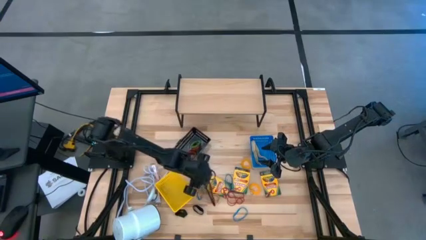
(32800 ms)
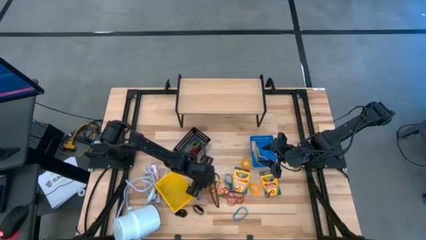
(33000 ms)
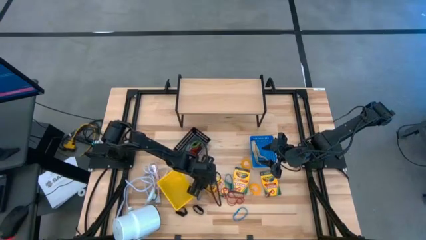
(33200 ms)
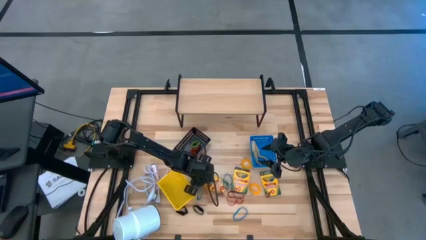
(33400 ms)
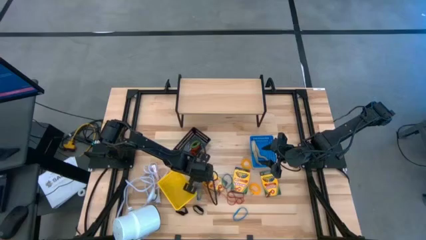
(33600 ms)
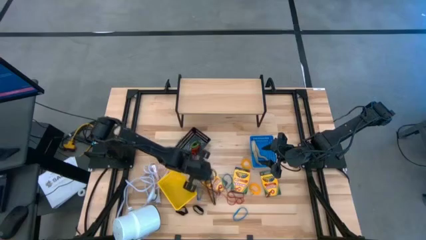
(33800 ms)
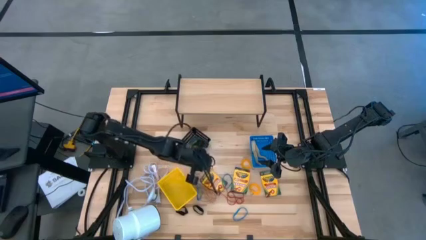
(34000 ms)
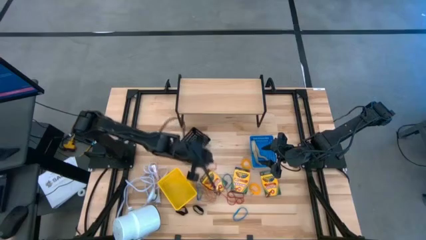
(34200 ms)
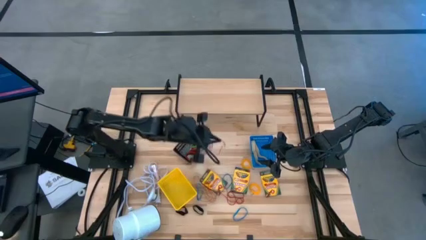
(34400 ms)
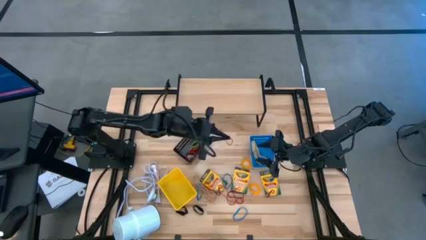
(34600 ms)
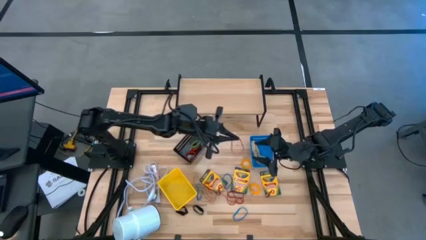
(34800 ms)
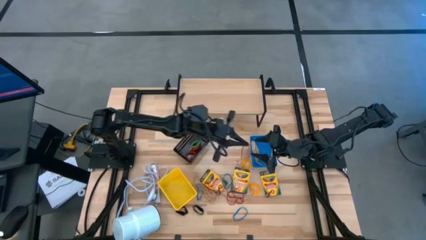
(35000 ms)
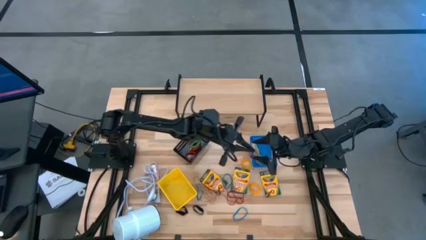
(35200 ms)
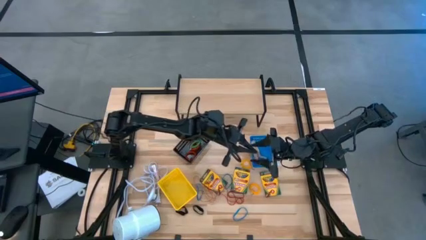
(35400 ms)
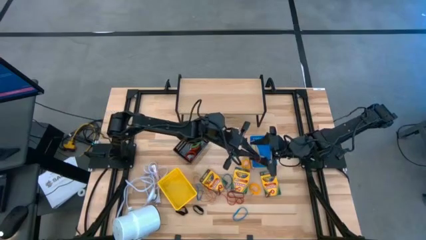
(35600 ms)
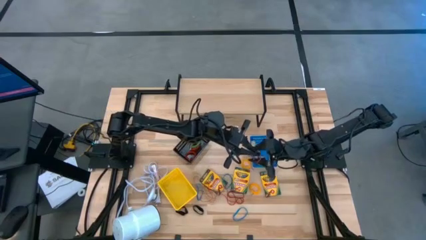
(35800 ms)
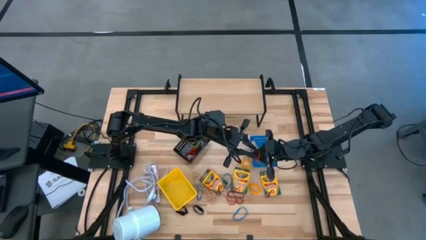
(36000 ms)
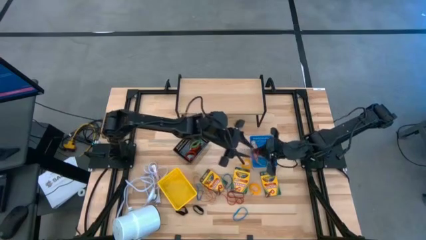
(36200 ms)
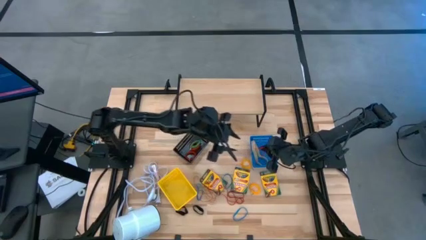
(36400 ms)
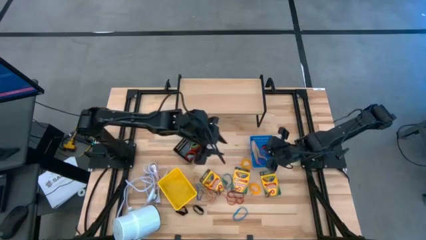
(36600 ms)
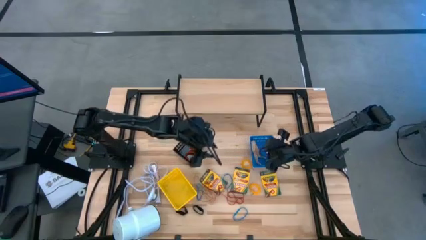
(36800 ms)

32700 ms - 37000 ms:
Task: Pick & Place Office Desk Supplies
Put the red rubber band into the blue bin

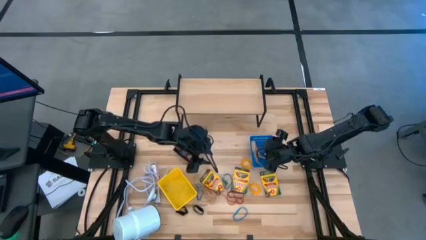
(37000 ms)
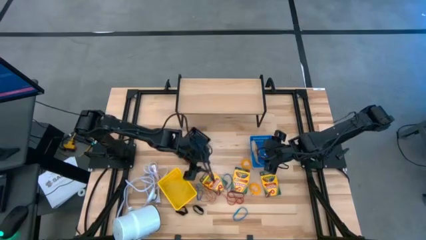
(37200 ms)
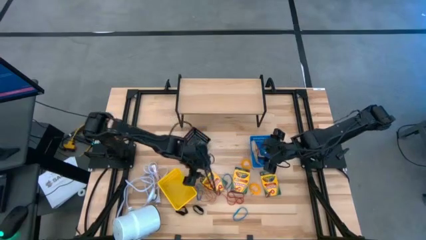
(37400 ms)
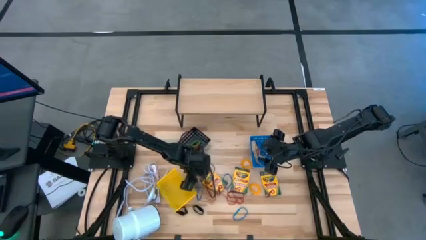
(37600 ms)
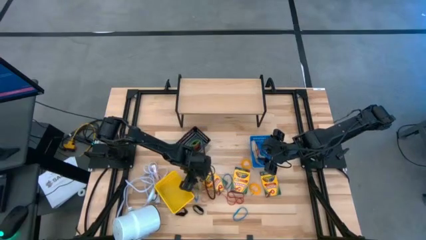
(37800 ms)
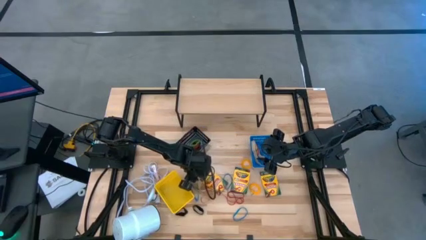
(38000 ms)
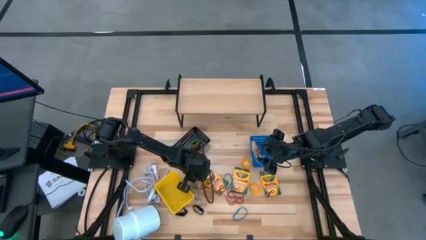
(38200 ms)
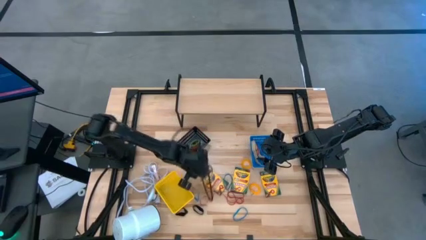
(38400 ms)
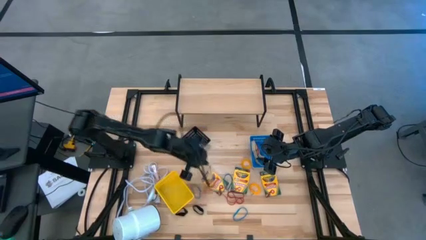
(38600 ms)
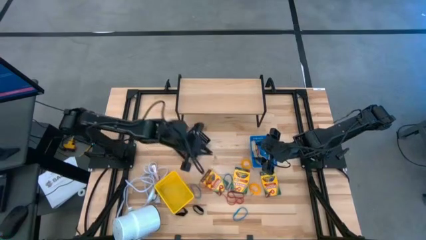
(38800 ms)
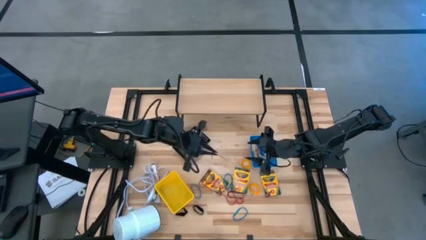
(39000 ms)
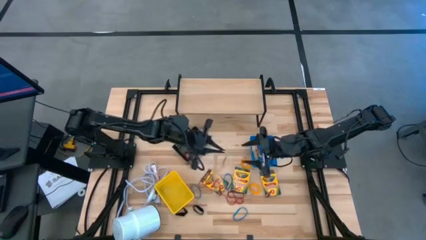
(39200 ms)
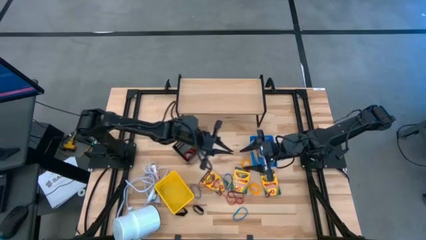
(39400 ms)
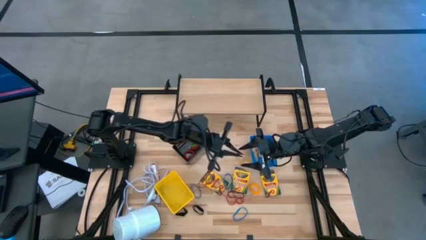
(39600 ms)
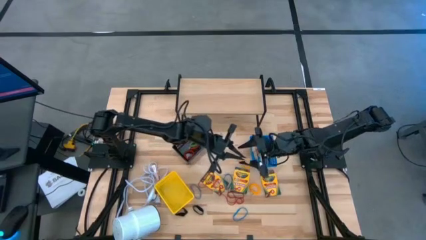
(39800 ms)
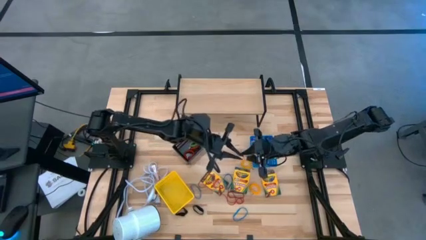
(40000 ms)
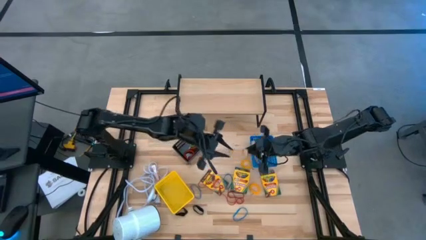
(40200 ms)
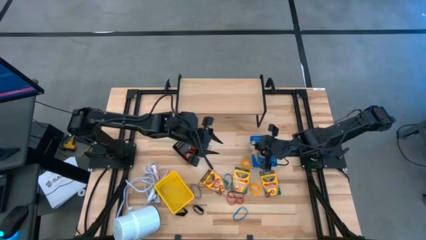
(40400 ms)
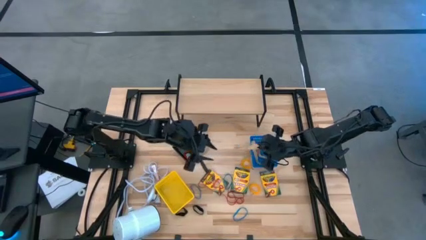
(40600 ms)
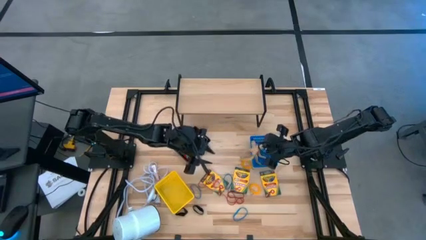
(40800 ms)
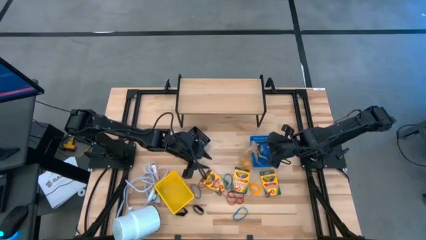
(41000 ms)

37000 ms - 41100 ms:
Put the white rubber band into the blue bin

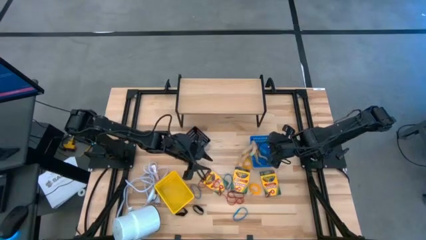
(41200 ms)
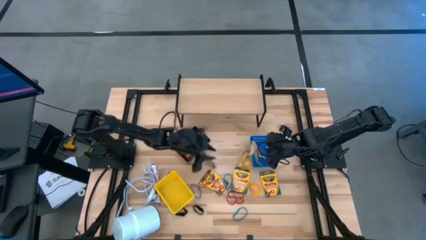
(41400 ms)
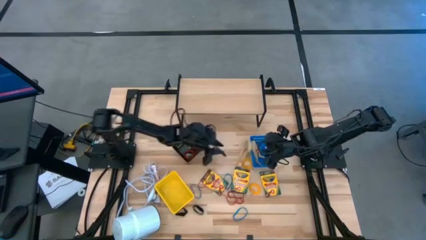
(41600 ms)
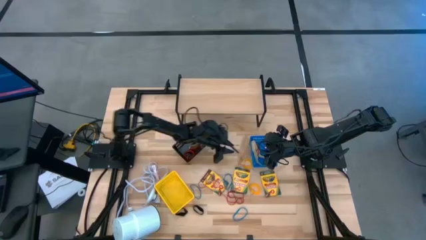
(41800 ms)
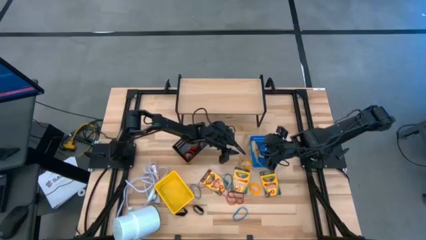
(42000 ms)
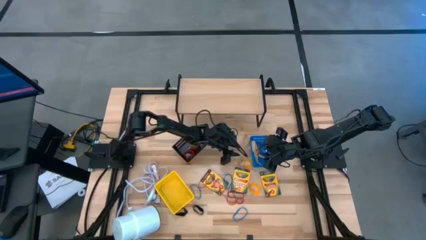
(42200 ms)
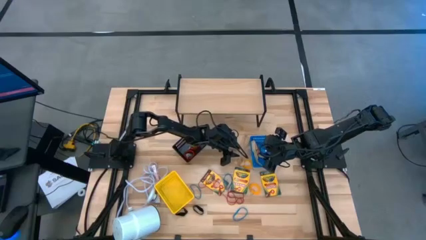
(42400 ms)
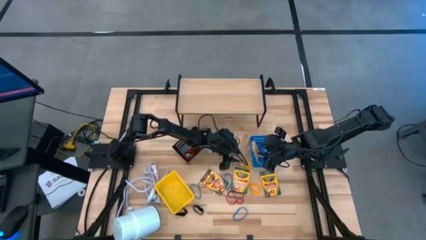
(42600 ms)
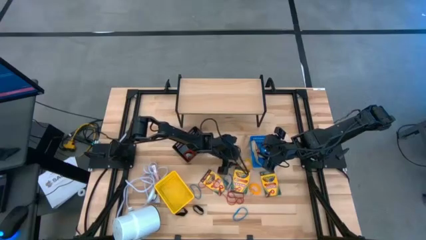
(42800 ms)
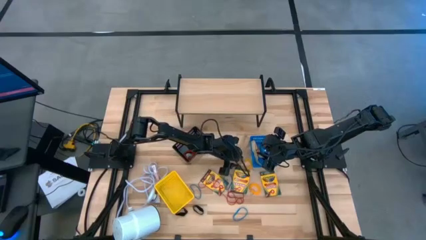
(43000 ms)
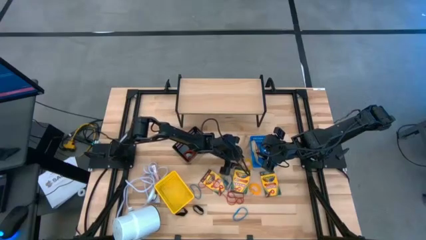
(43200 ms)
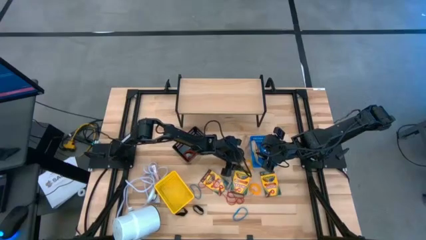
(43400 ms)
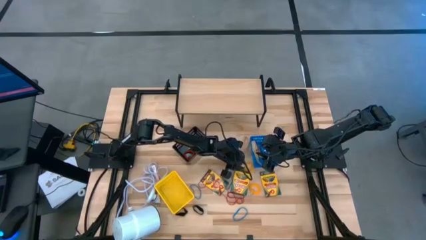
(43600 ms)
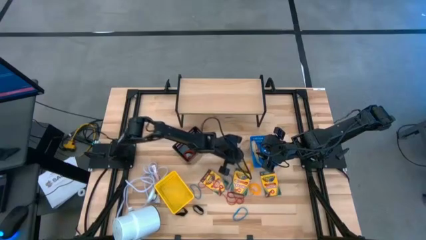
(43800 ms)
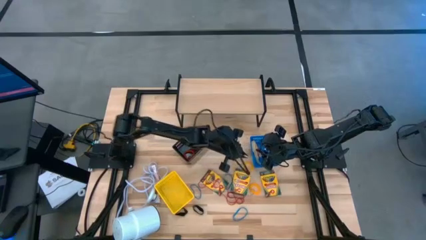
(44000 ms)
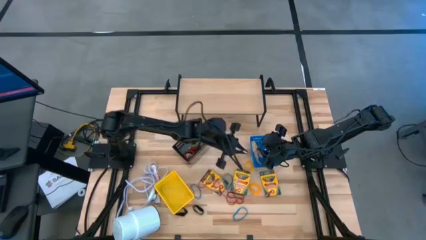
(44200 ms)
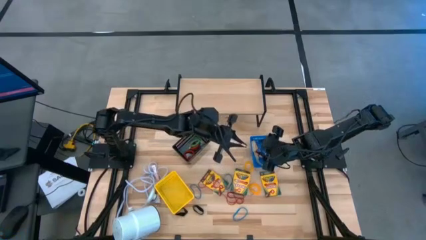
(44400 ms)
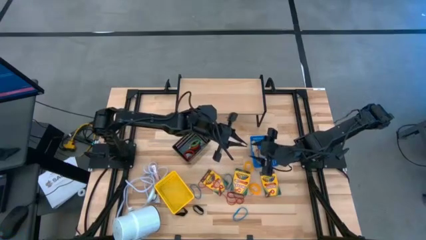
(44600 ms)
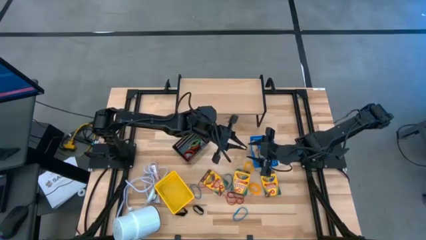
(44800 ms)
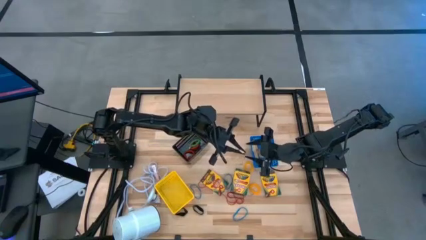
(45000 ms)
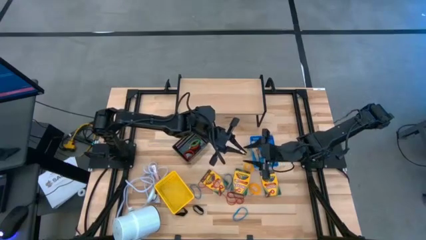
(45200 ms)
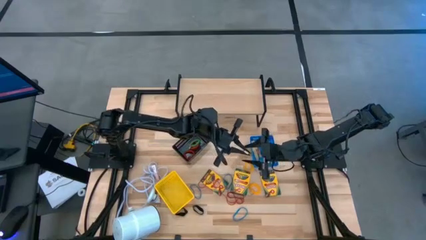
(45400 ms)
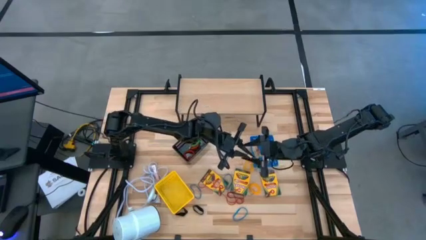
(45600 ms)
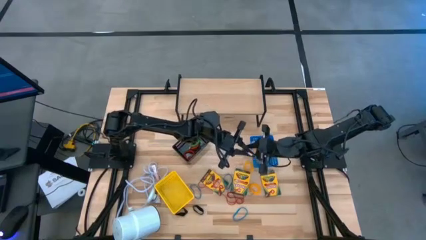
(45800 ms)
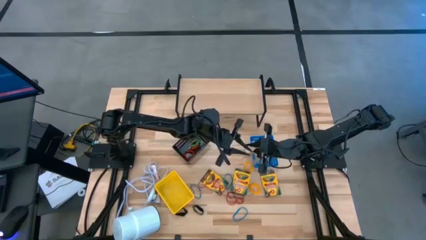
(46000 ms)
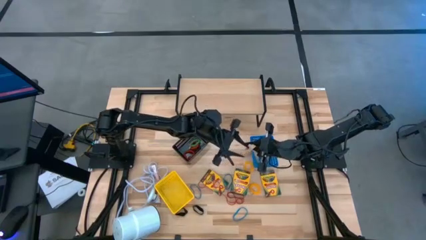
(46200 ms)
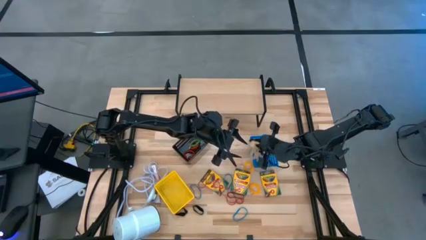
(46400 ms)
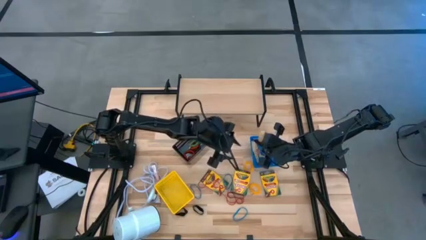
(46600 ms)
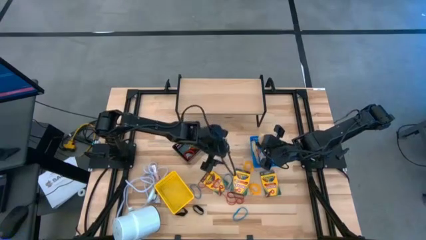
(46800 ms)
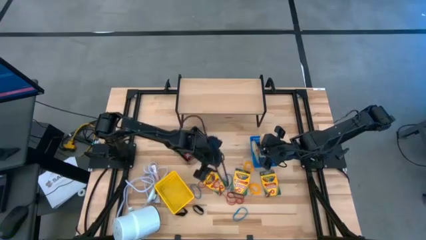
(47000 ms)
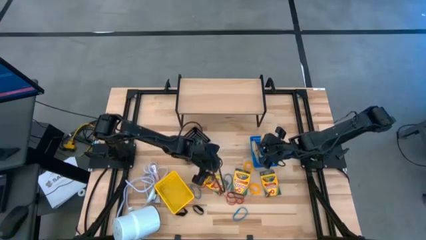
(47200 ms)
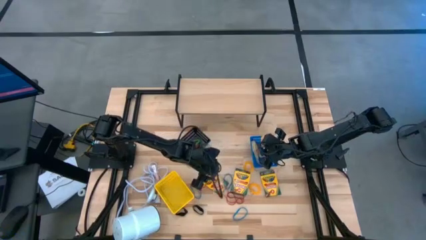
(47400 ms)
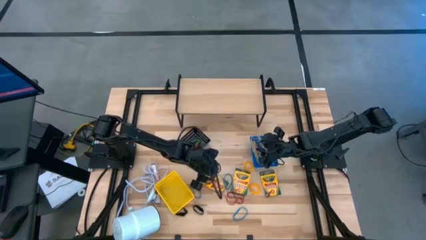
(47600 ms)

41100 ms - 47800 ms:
Put the white rubber band into the blue bin

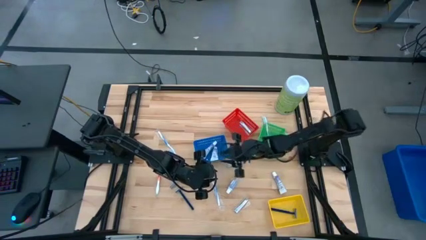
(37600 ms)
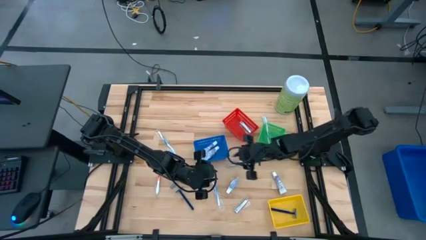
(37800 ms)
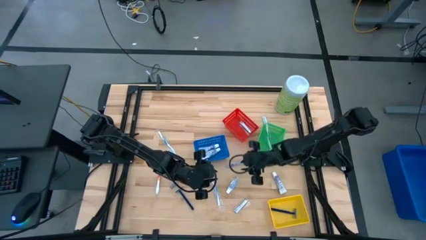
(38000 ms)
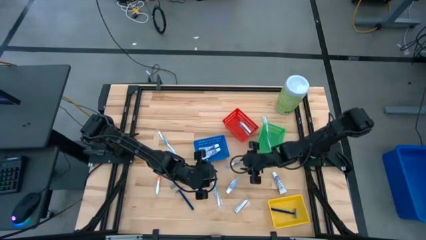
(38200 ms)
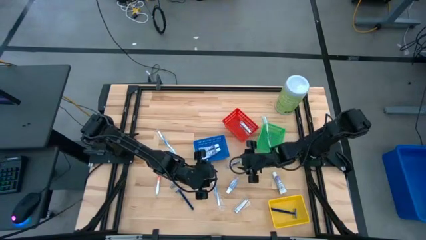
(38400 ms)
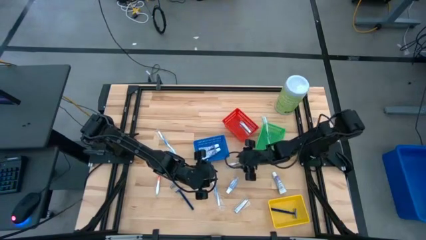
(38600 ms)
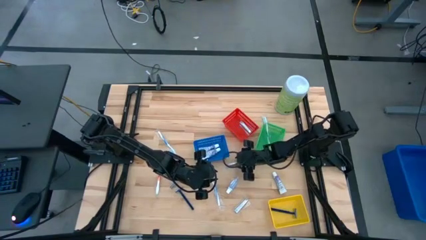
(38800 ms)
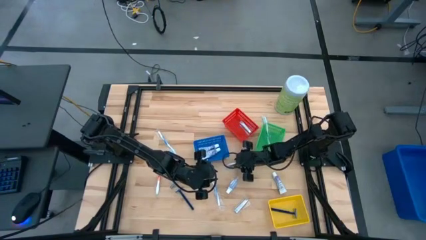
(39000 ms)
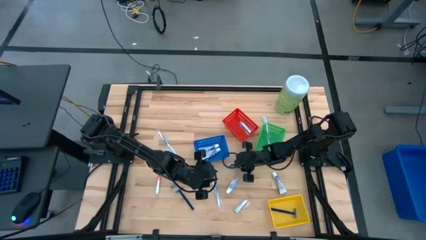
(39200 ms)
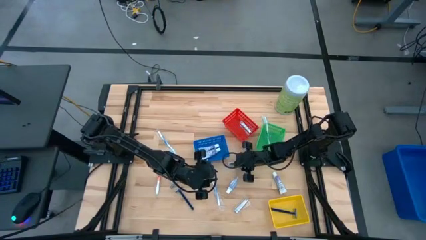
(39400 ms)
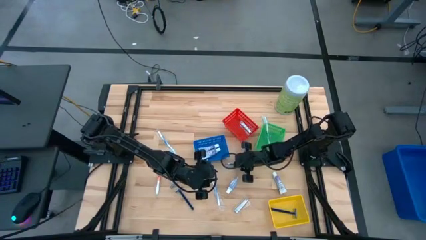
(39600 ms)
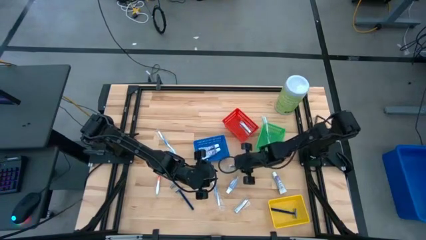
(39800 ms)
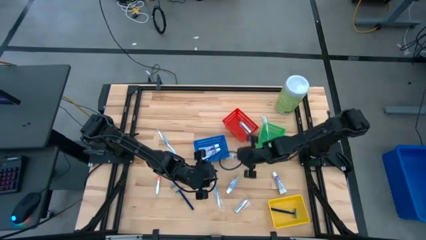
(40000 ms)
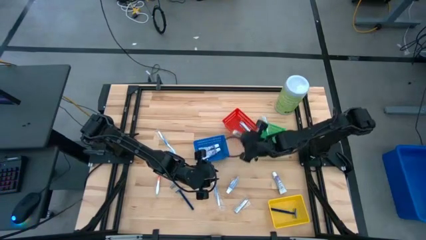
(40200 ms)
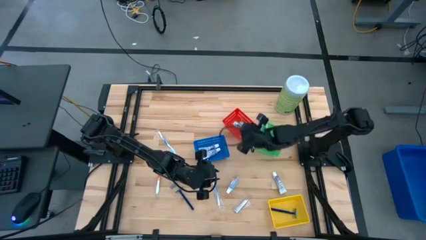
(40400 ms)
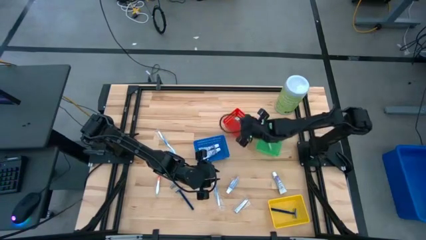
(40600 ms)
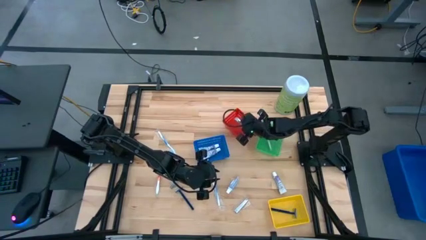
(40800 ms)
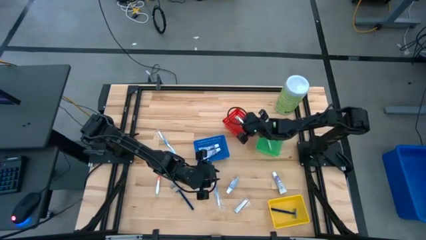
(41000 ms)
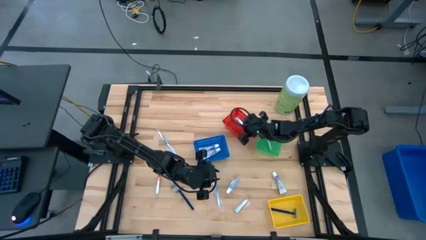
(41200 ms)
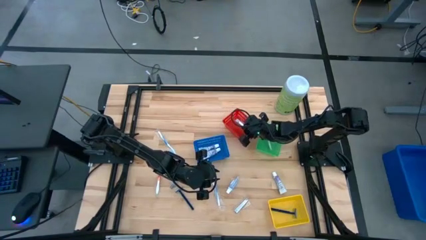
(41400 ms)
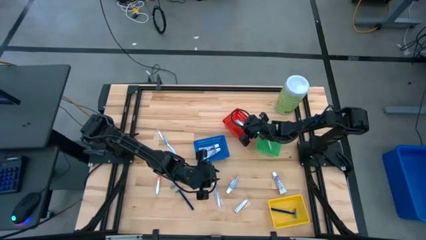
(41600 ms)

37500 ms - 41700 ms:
Task: Pick & Place Travel size toiletries
Put the silver nail cutter into the red bin
